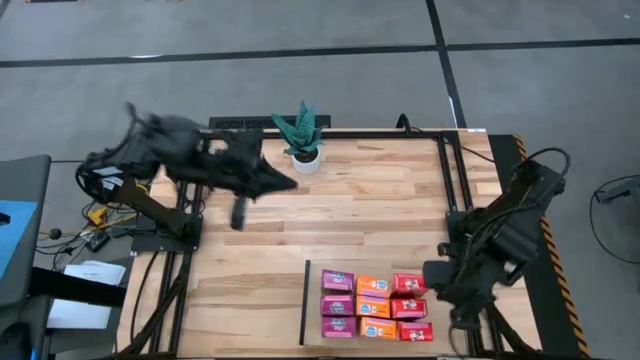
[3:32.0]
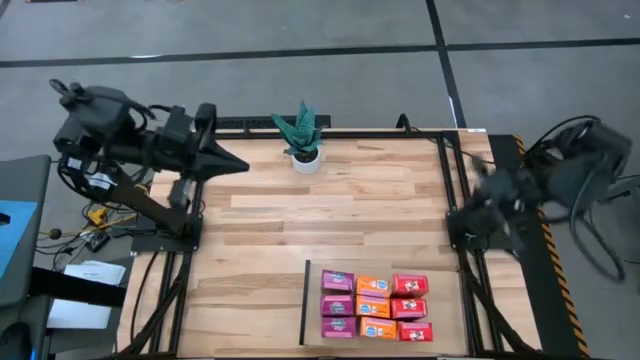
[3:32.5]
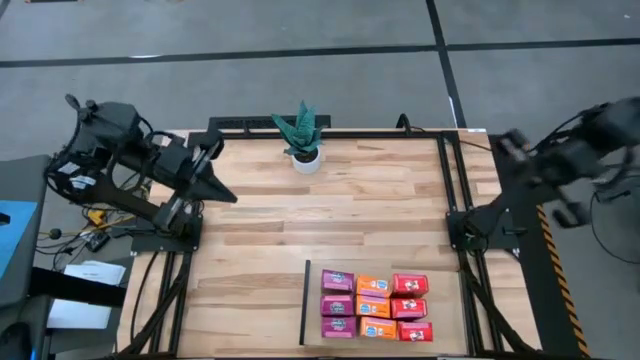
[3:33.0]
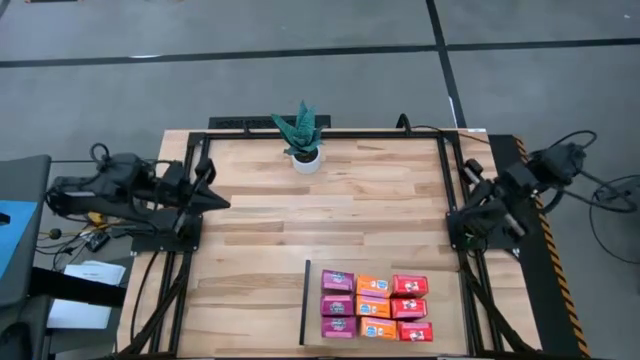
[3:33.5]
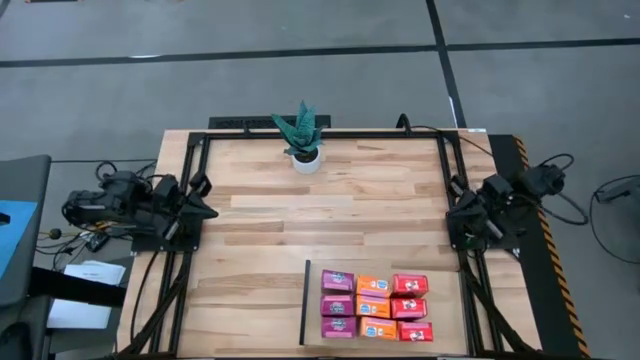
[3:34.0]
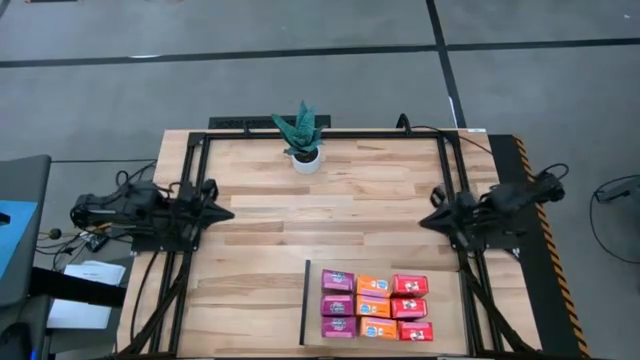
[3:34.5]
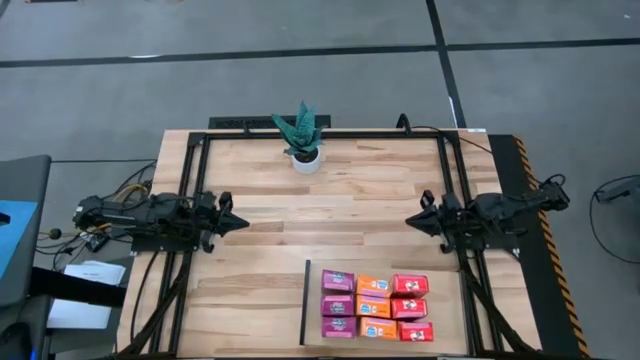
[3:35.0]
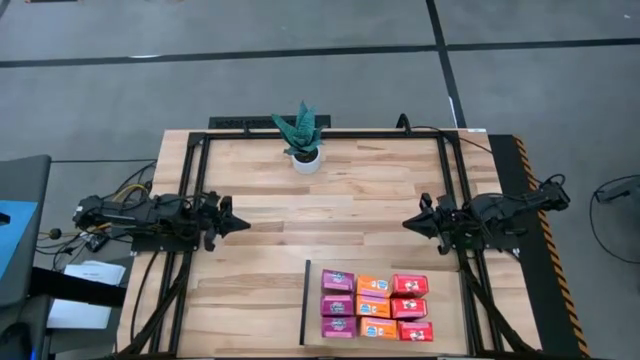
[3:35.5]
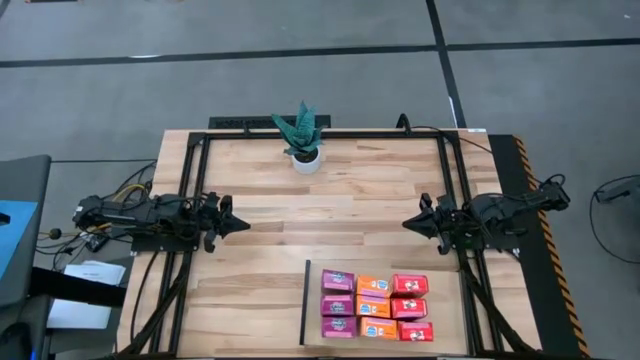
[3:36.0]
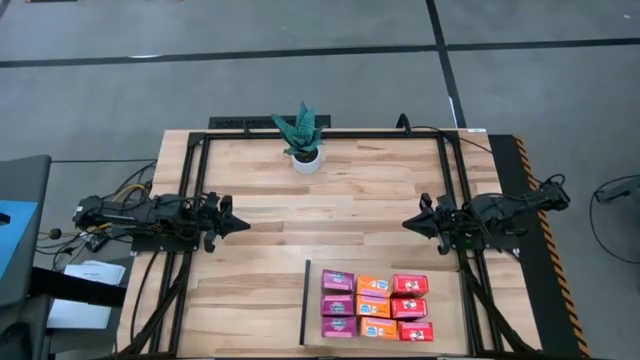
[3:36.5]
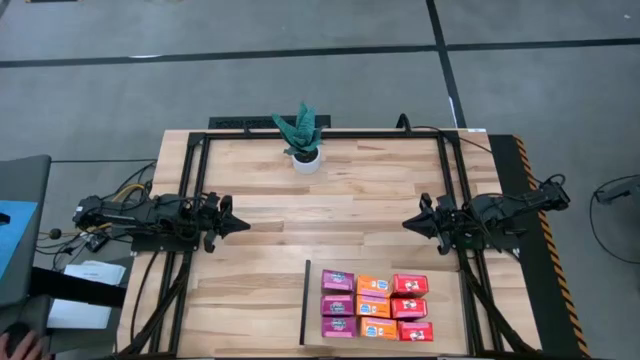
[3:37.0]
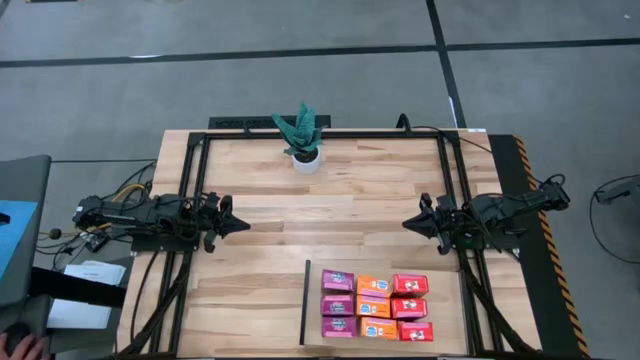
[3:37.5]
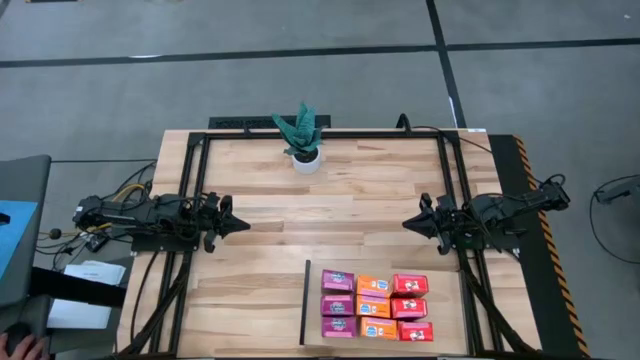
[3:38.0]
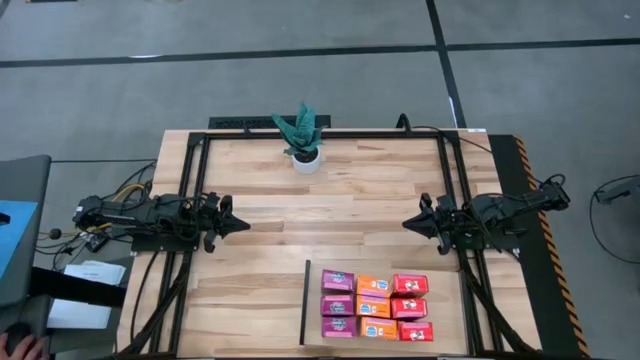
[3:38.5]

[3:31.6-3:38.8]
Task: Stack cereal on shelf
Return to Home Position

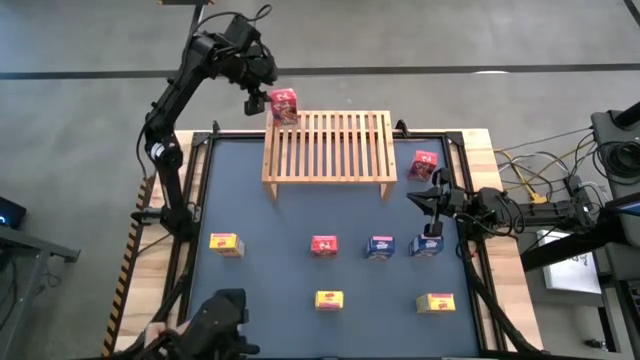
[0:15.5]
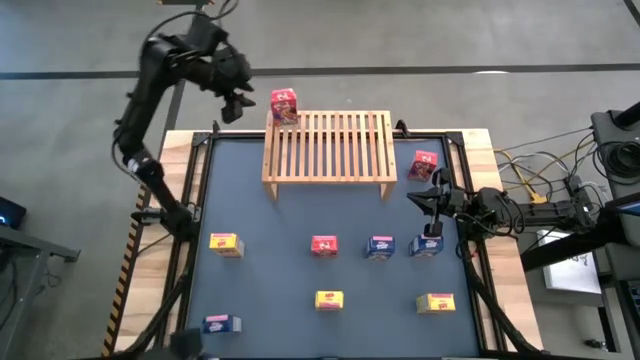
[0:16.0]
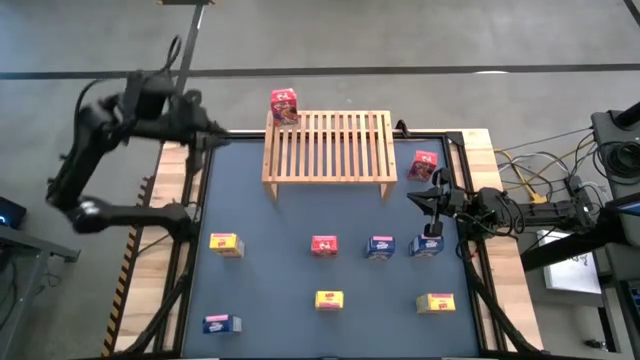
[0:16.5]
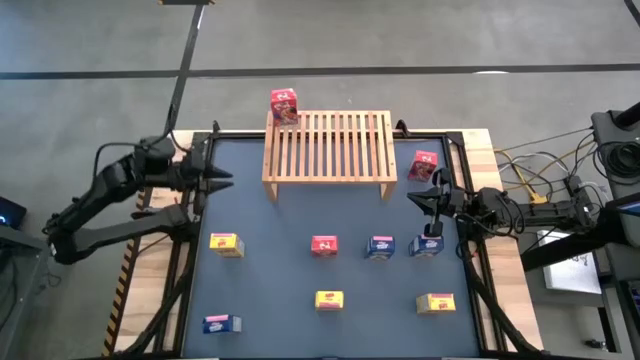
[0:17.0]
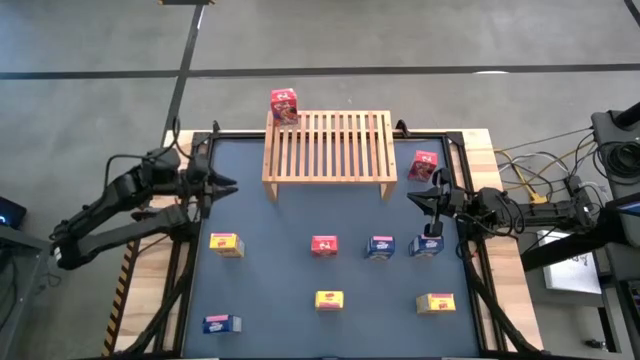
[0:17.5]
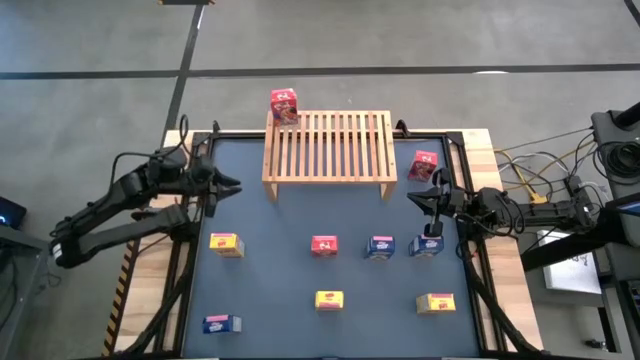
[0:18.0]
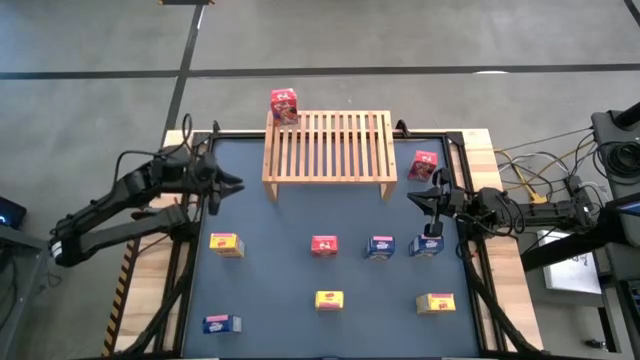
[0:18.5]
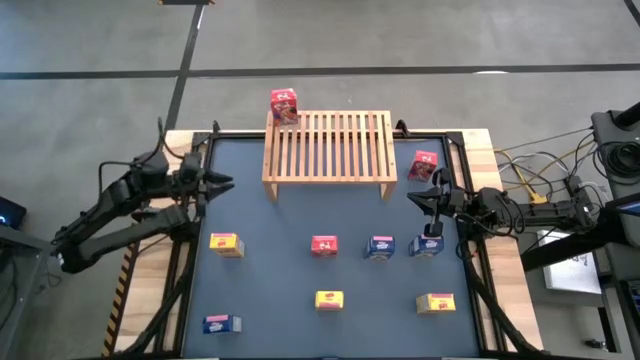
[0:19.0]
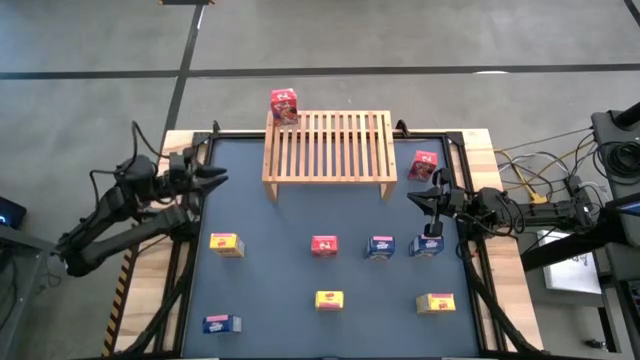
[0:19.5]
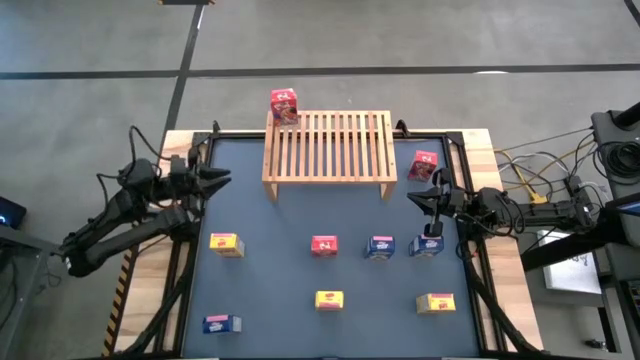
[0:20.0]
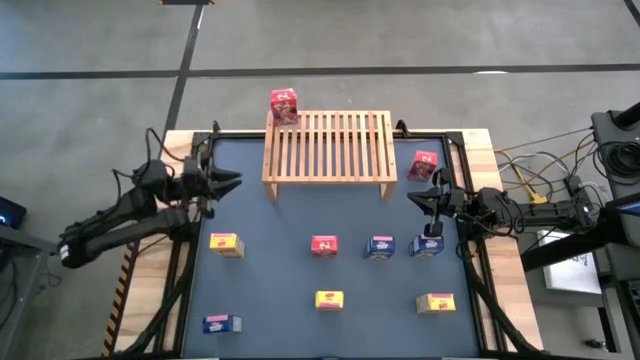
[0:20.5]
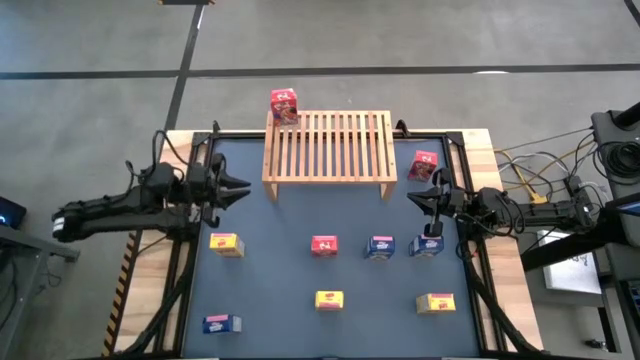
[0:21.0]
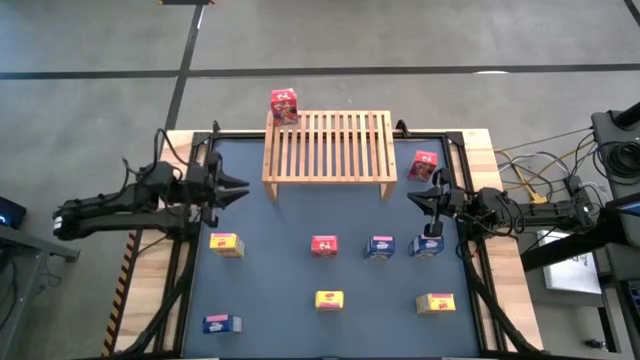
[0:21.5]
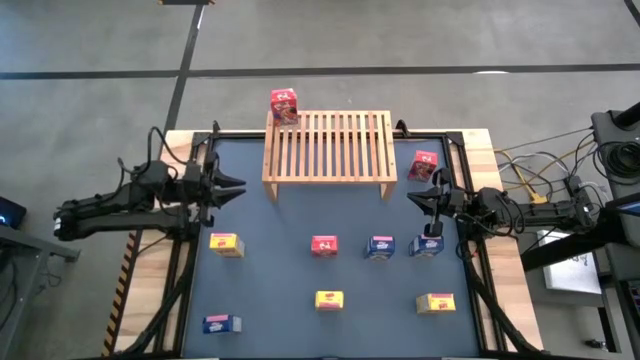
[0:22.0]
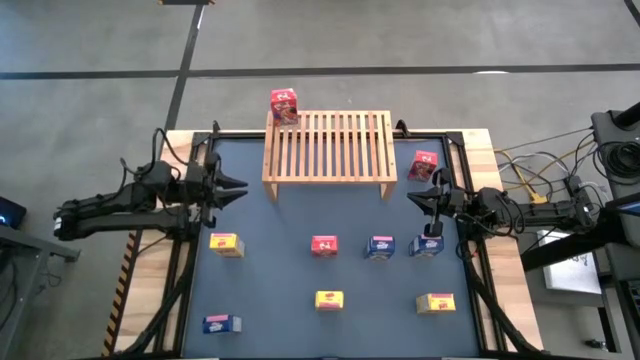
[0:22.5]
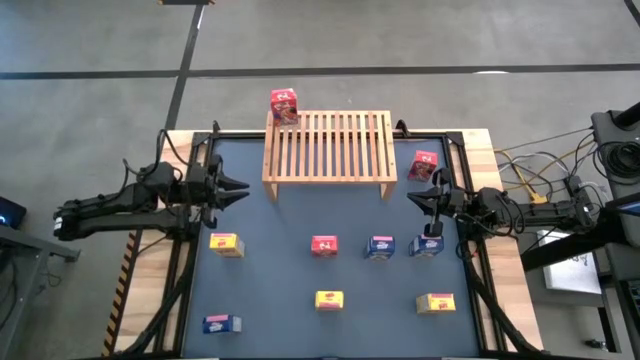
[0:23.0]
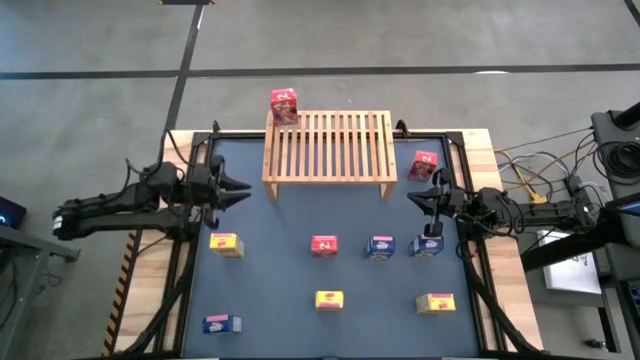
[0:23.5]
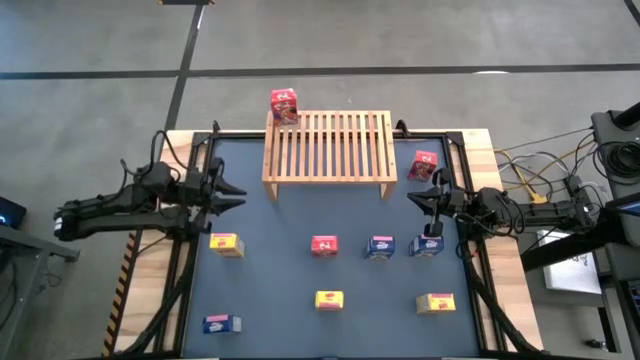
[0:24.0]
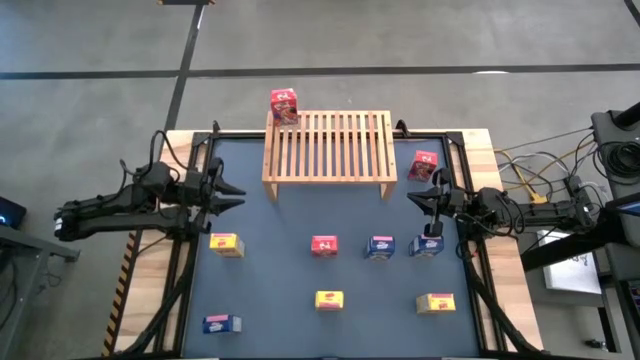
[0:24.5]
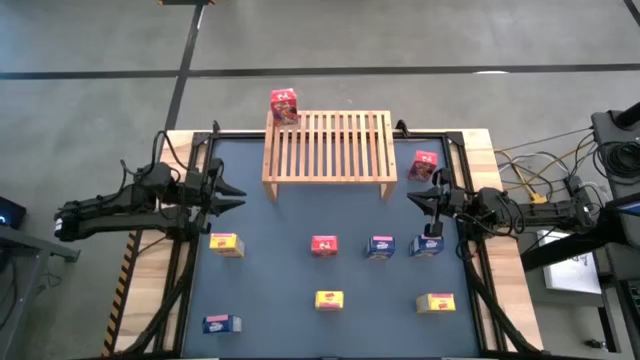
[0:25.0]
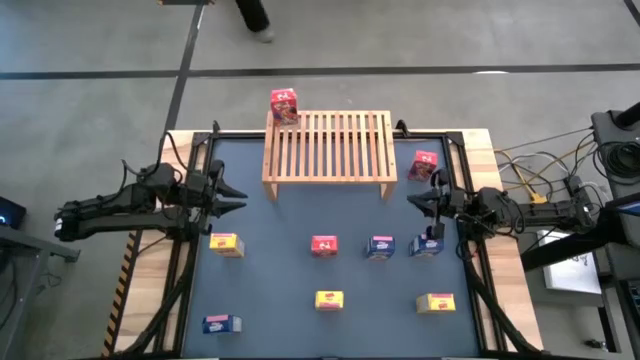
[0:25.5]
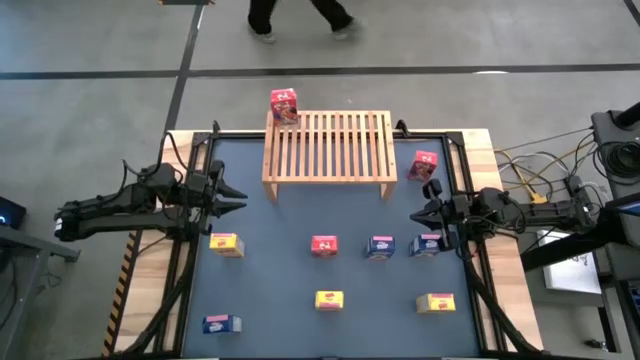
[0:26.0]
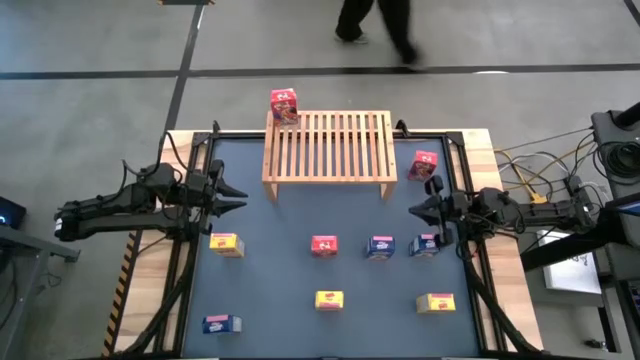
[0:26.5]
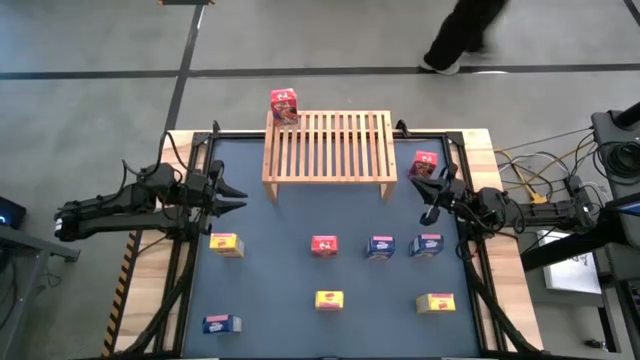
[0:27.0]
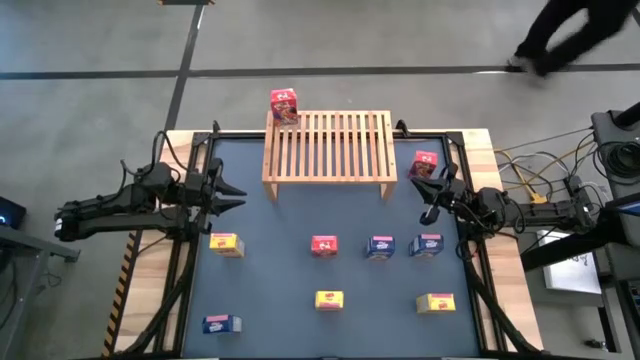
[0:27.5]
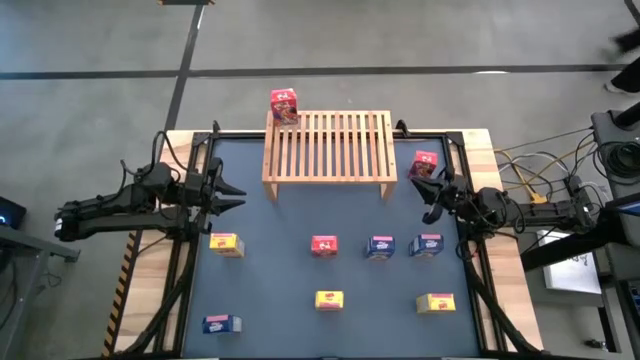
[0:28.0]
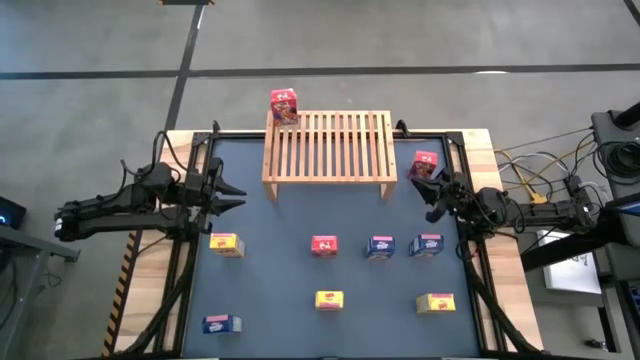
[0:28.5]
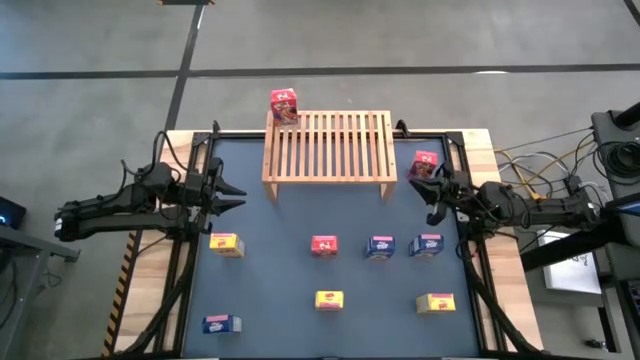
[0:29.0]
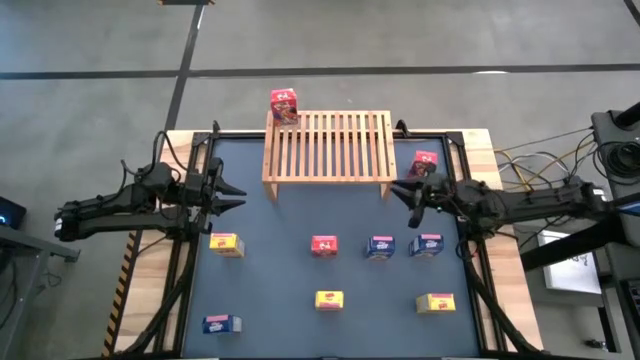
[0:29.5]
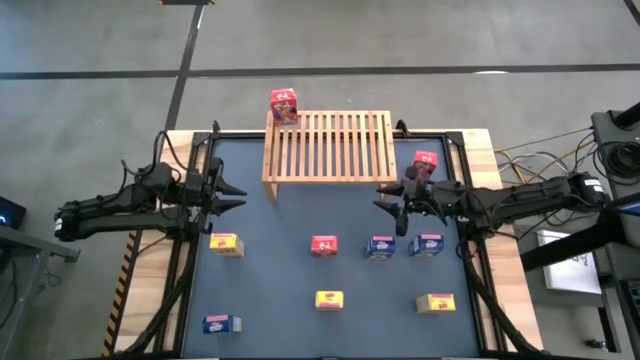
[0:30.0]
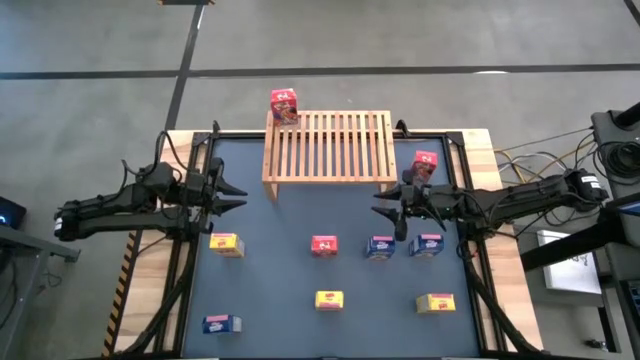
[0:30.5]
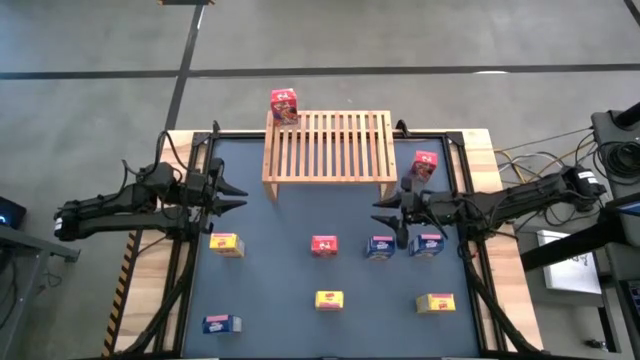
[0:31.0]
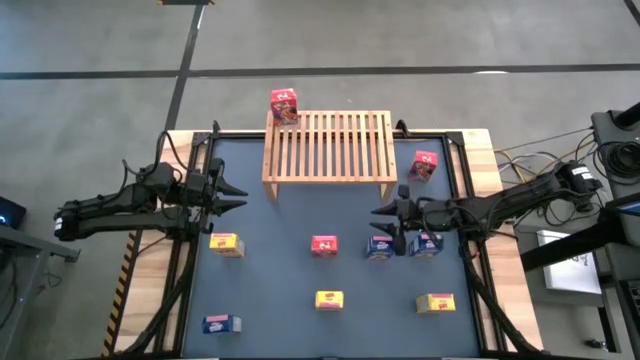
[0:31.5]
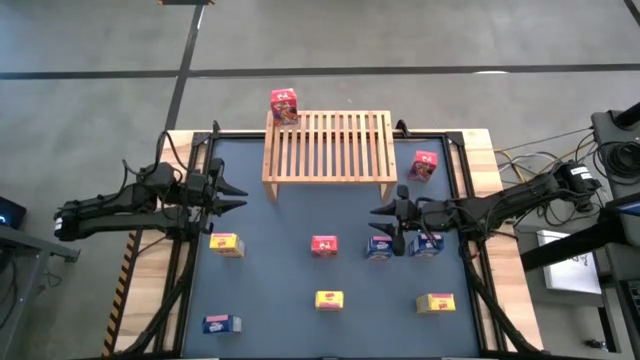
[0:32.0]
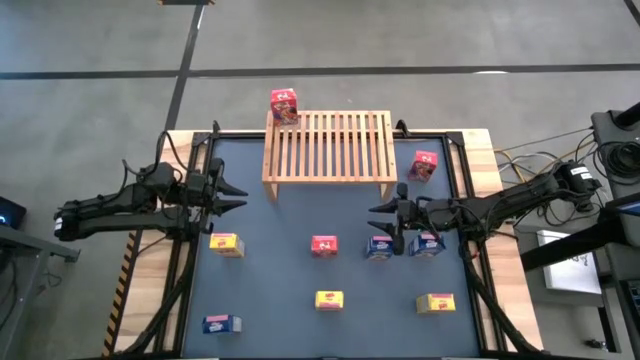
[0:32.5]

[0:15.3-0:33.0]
Task: Stack cereal on shelf
Put the bottom red cereal box aligned with the other red cereal box on the shelf
